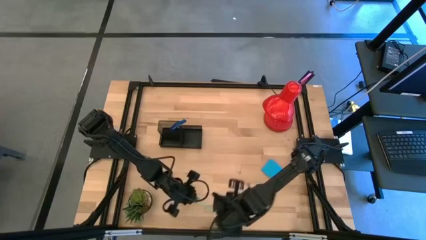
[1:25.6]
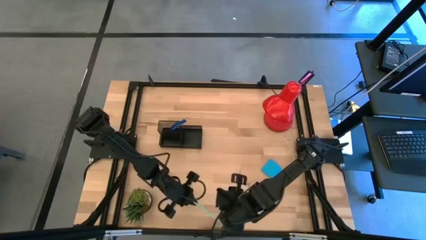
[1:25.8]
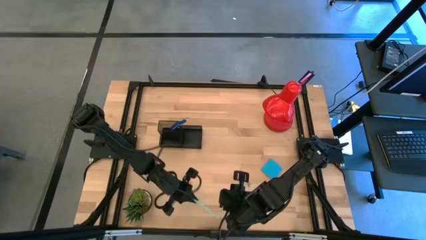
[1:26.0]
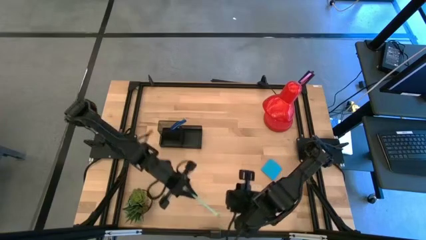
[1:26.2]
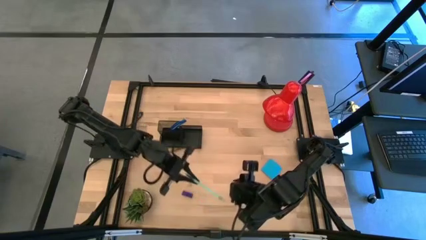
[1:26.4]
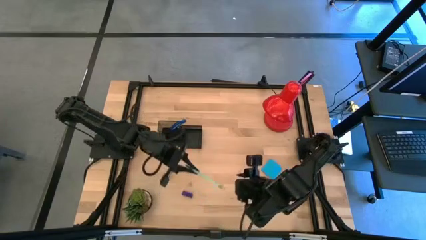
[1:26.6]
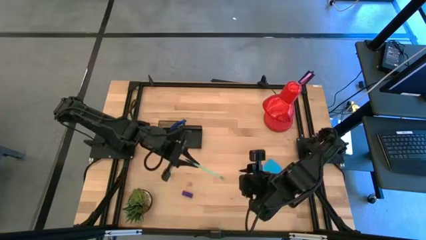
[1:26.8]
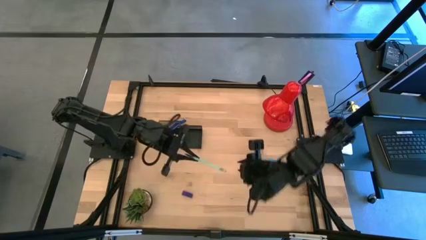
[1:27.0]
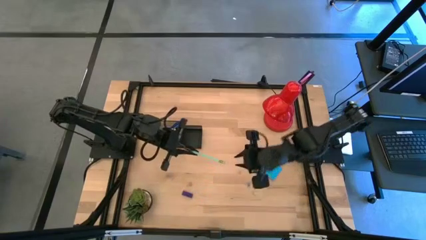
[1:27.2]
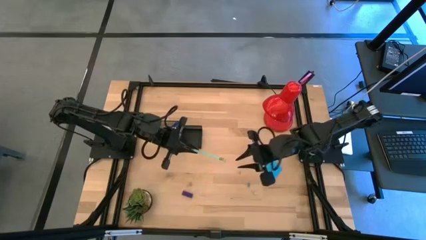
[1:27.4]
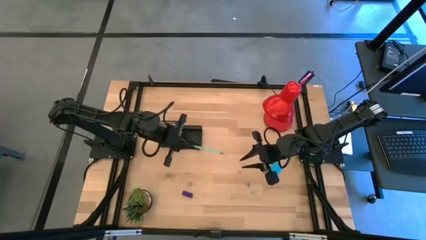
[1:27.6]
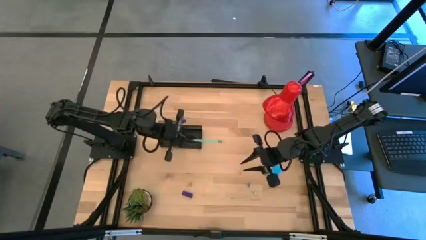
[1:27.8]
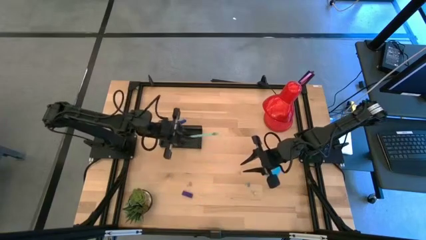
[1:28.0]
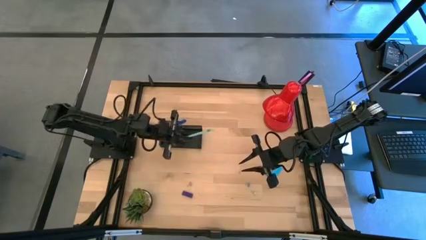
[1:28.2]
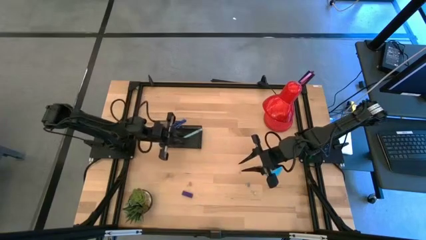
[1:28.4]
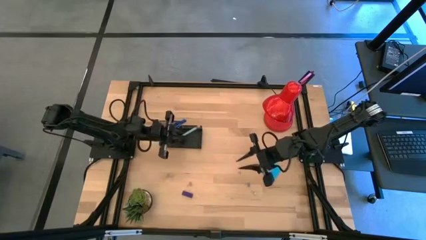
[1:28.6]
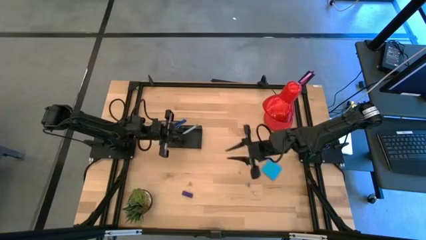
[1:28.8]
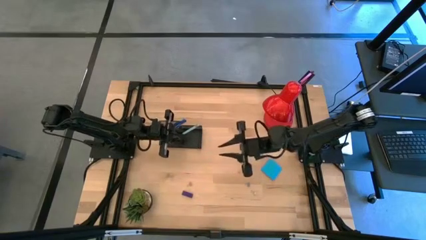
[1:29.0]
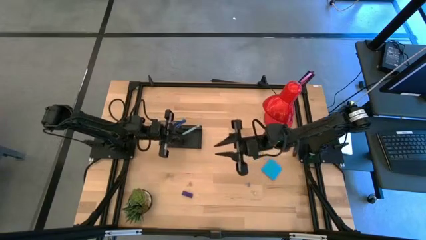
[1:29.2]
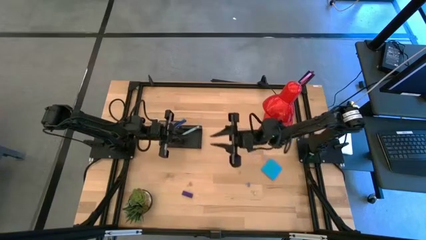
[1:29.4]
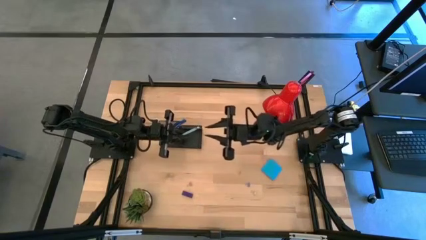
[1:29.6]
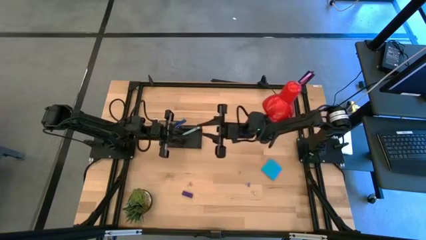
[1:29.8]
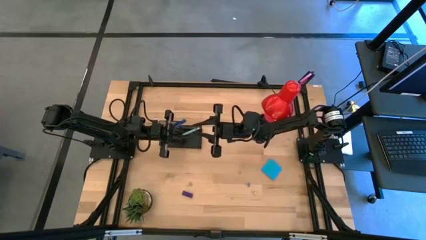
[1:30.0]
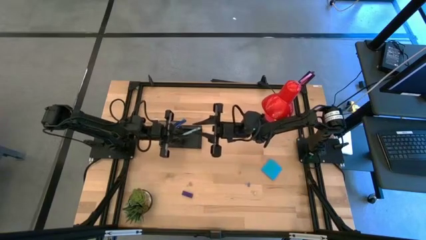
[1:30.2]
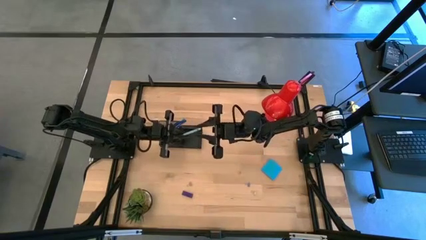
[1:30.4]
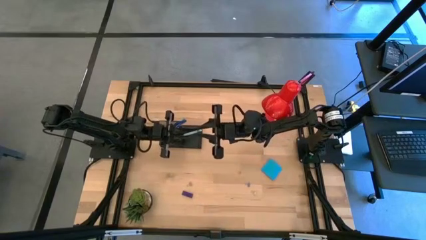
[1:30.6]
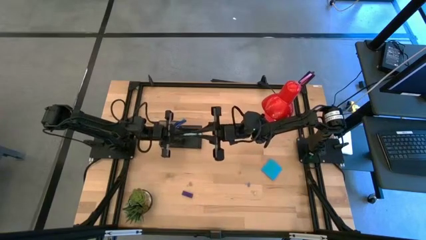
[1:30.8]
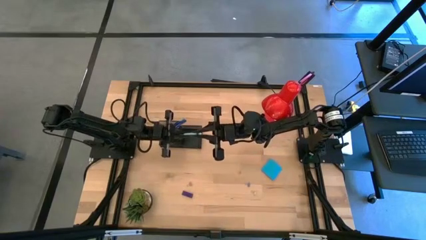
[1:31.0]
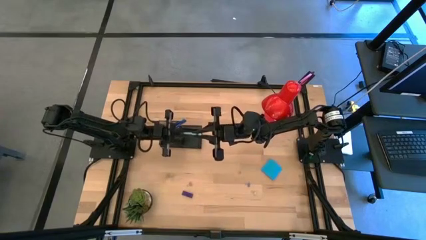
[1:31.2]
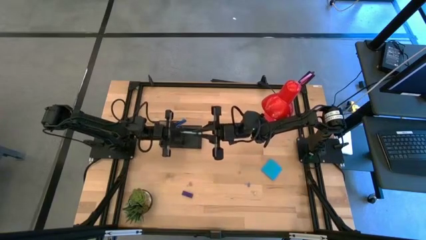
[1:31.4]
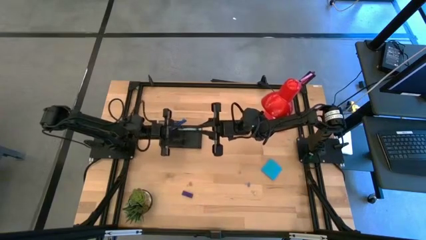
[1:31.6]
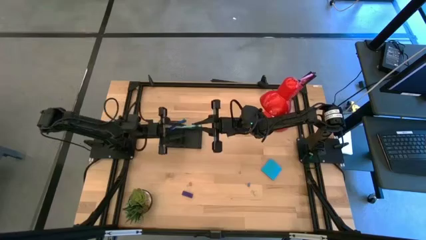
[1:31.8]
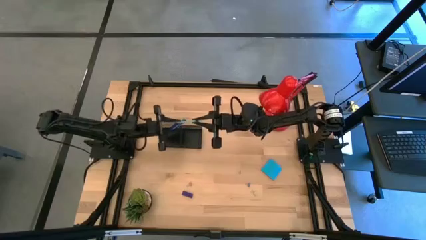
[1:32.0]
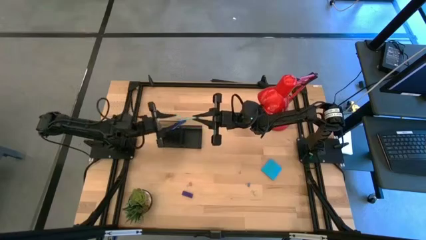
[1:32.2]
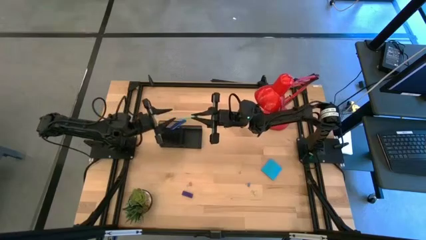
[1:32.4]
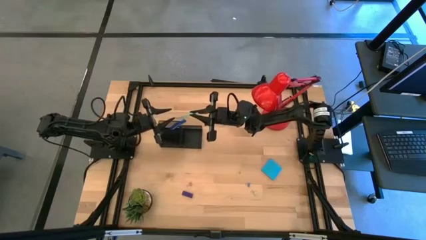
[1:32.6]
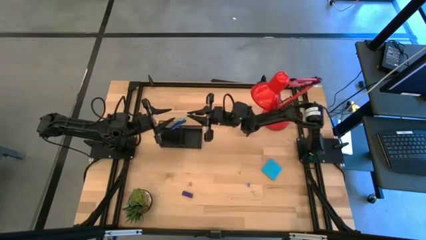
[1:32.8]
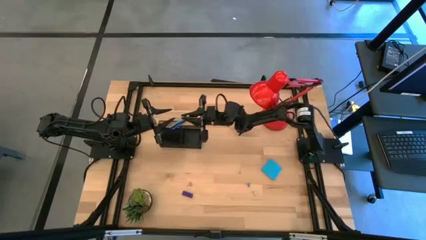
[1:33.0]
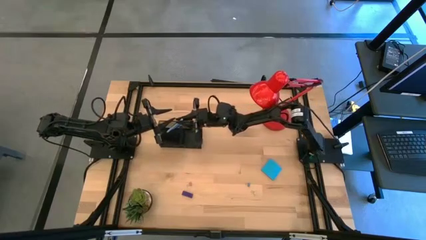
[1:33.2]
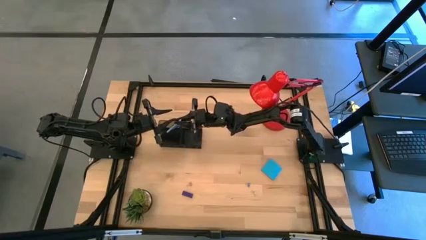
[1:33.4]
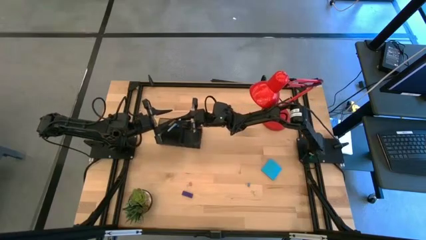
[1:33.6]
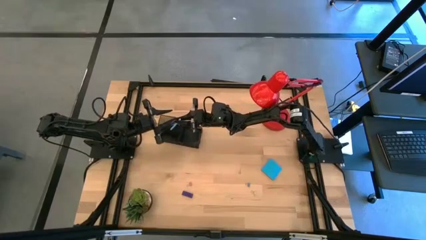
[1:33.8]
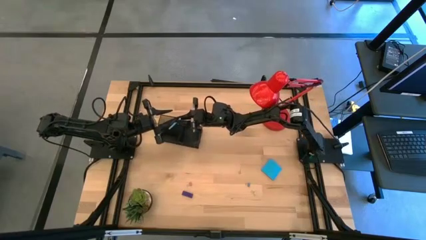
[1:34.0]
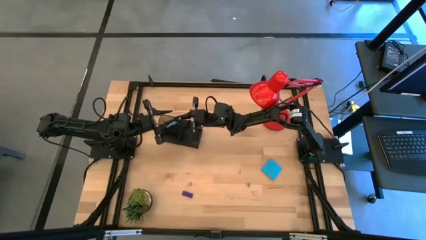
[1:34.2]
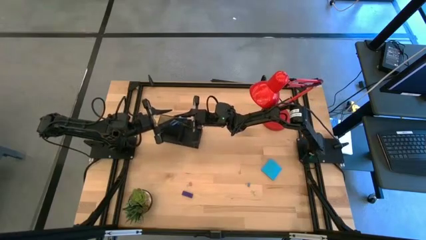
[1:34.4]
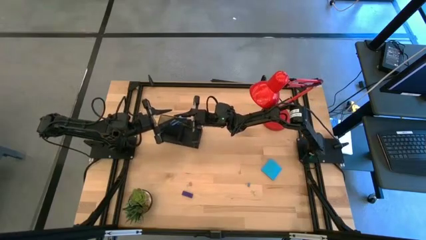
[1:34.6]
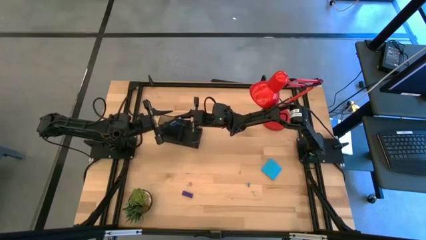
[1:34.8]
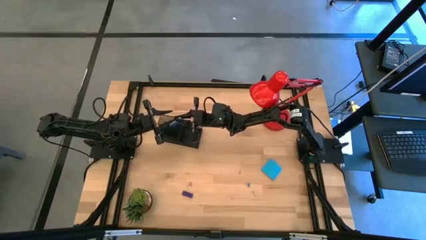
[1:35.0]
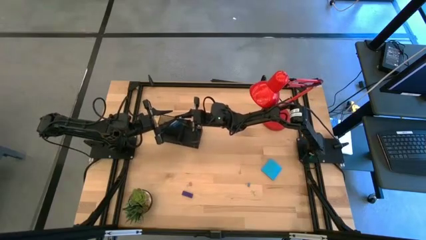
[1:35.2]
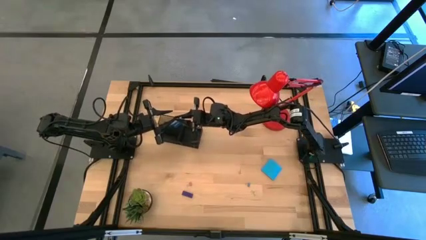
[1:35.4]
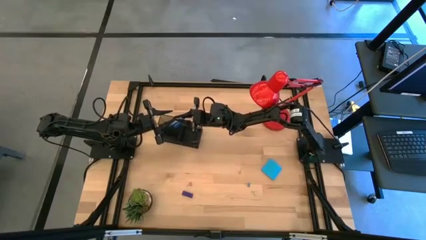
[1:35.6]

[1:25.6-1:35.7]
Task: Pick and place office supplies into organizer
Put the blue pencil into the black desk organizer

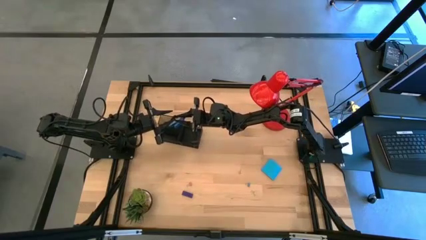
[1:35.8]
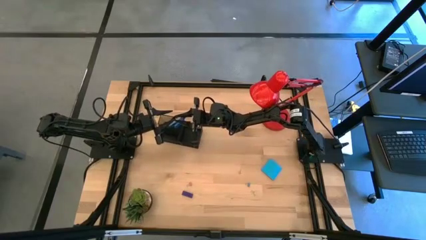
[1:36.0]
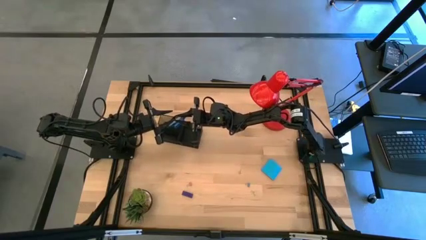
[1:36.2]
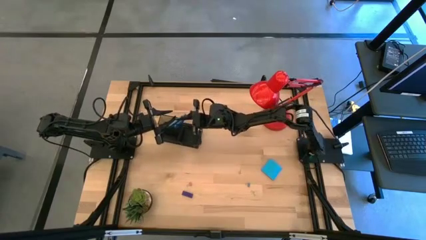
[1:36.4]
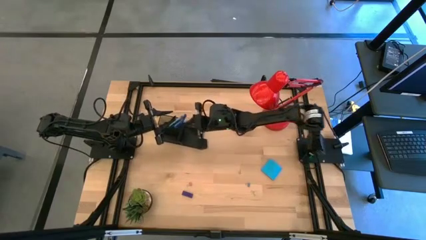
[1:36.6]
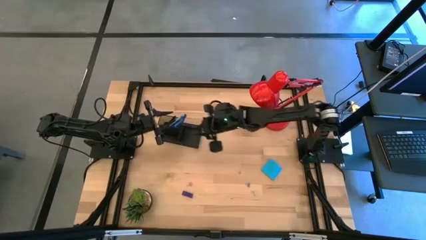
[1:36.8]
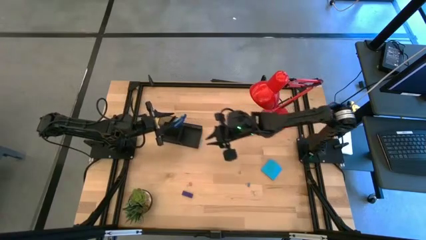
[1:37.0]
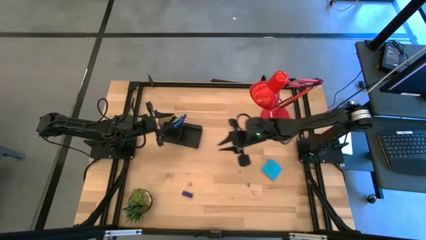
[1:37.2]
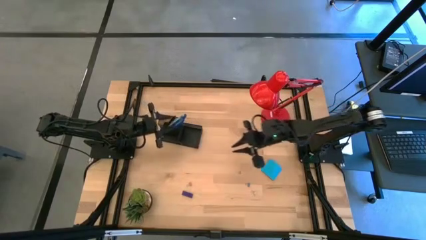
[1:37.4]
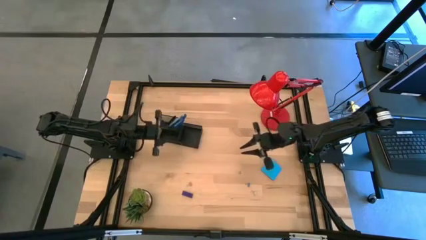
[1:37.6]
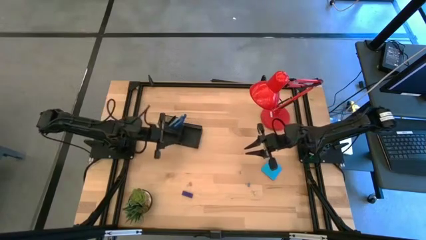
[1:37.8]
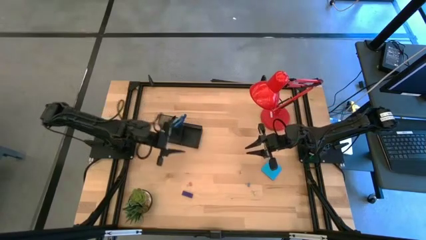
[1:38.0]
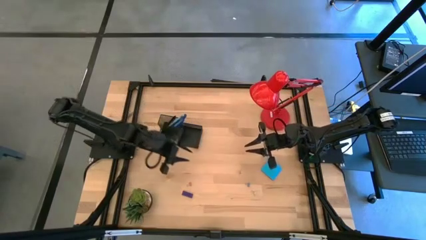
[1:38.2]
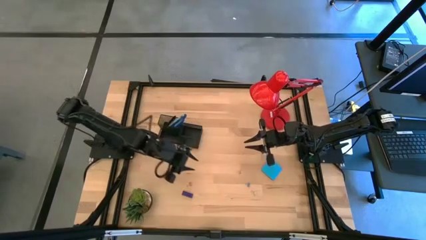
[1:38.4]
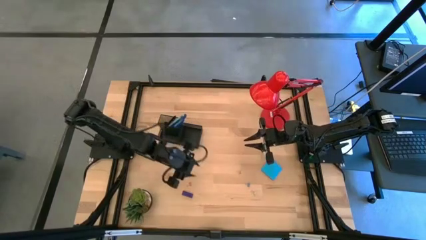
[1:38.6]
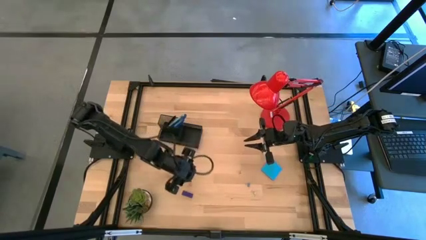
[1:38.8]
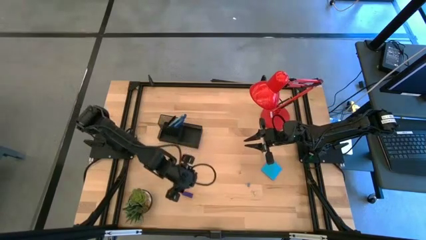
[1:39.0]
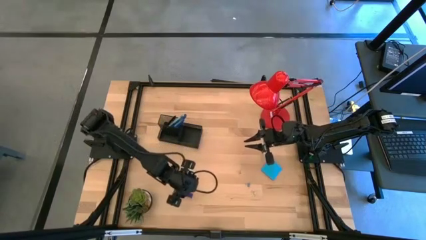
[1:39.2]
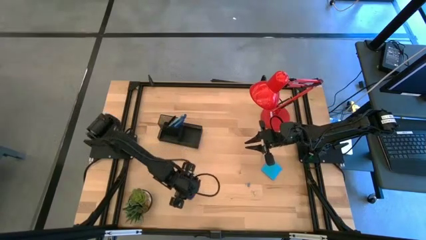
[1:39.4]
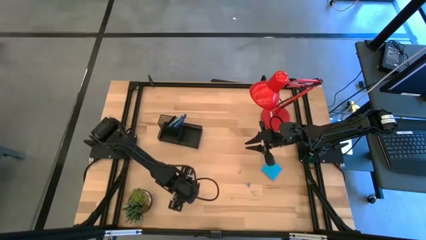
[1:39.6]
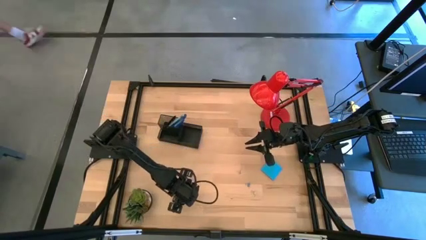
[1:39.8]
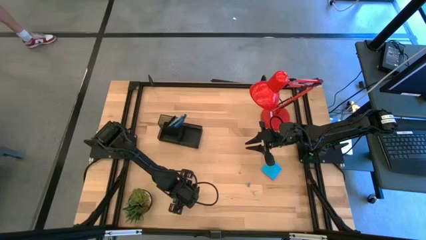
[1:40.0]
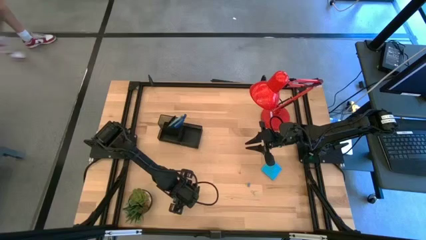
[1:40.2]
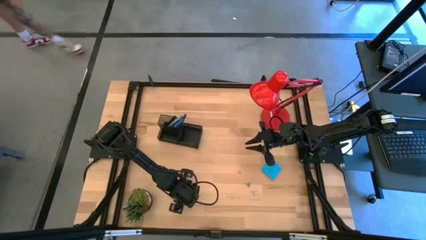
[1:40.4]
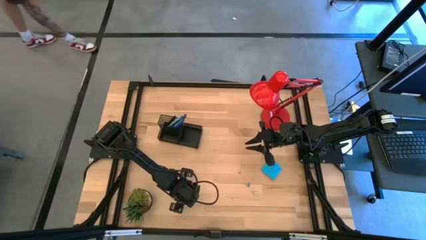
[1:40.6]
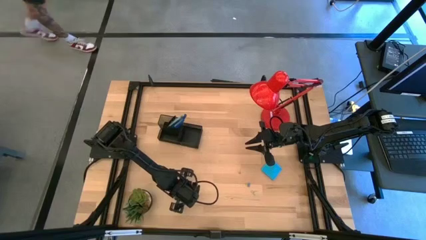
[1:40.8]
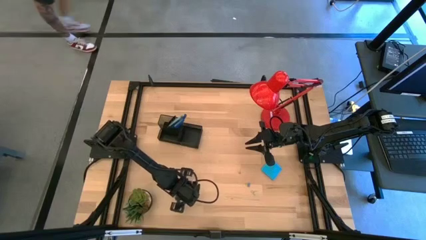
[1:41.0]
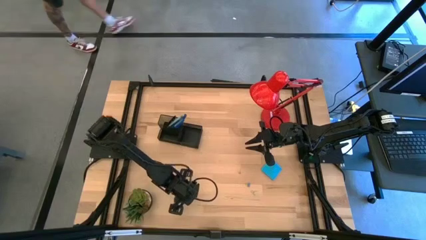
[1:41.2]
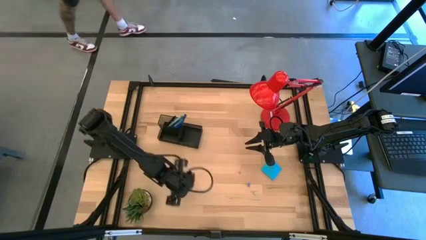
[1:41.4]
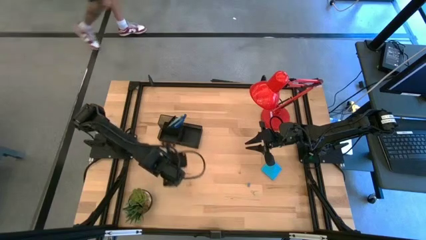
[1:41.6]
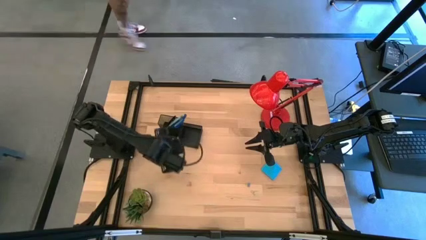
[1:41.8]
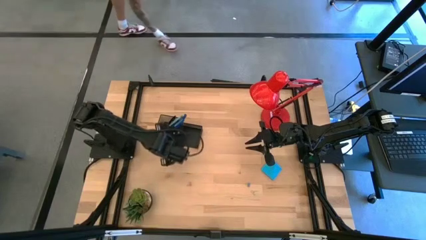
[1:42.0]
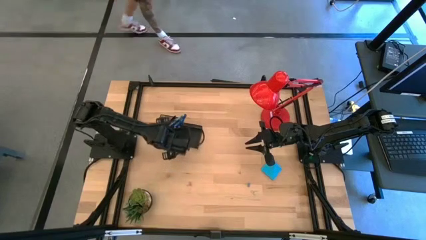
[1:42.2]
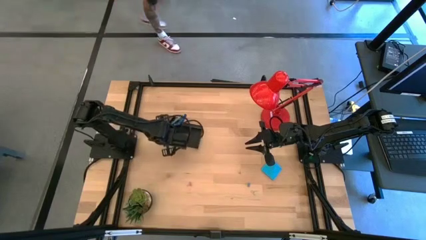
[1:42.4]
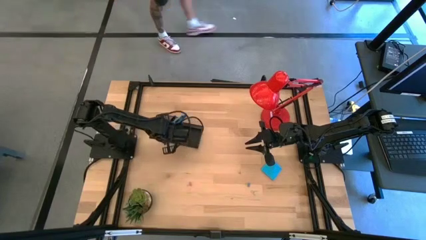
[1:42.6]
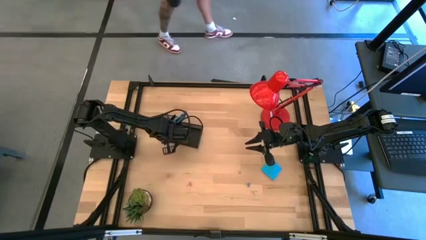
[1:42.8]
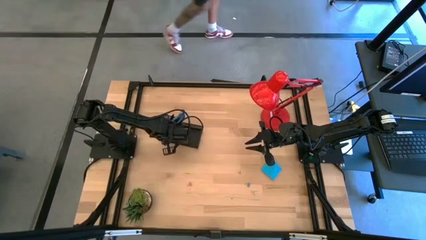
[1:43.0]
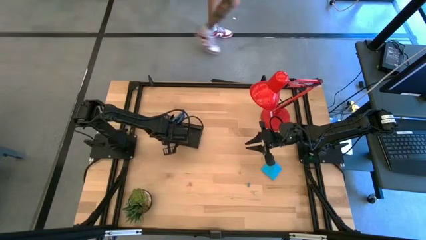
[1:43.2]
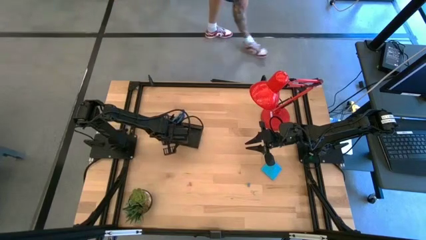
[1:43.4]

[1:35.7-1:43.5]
Put the blue eraser into the black desk organizer
